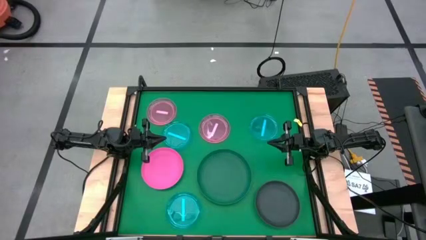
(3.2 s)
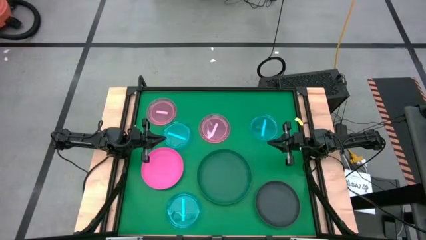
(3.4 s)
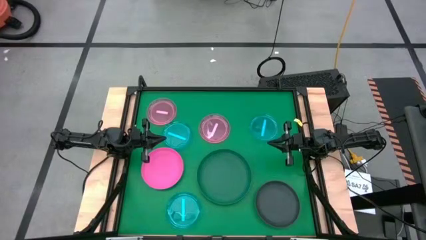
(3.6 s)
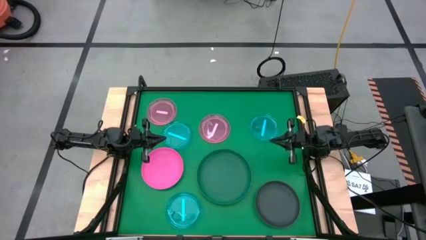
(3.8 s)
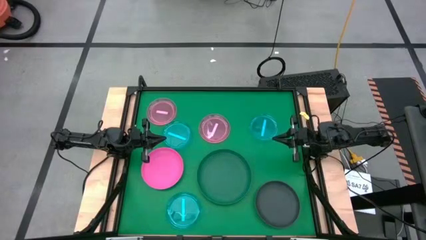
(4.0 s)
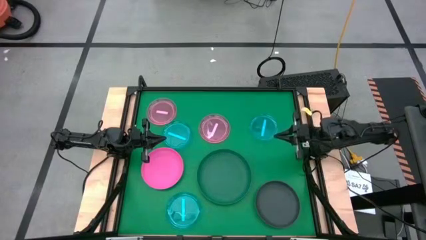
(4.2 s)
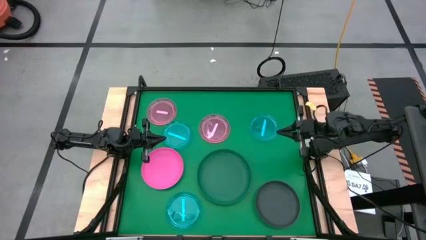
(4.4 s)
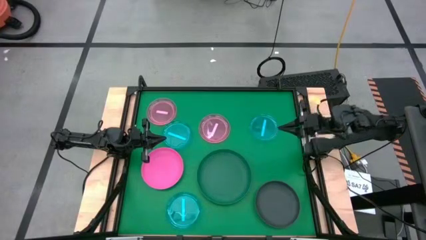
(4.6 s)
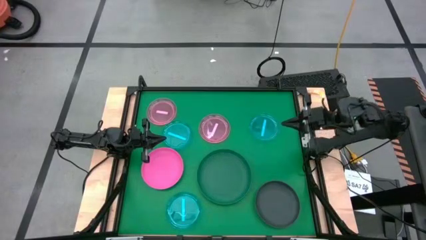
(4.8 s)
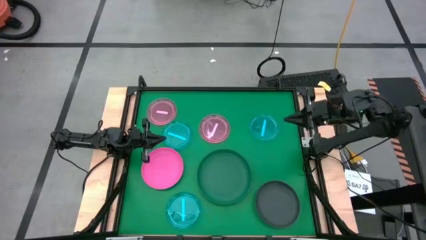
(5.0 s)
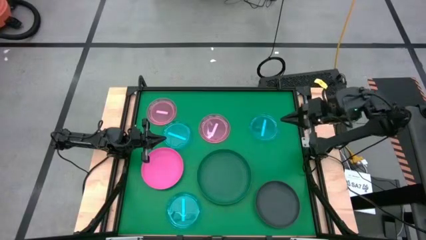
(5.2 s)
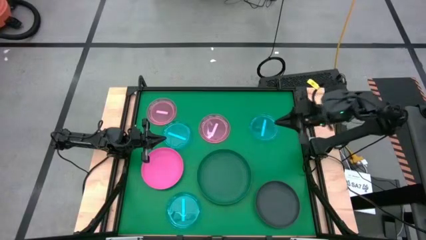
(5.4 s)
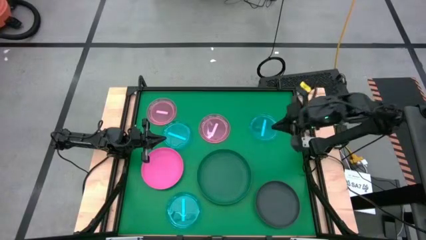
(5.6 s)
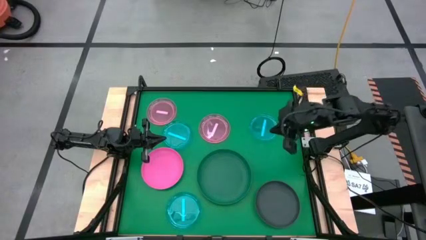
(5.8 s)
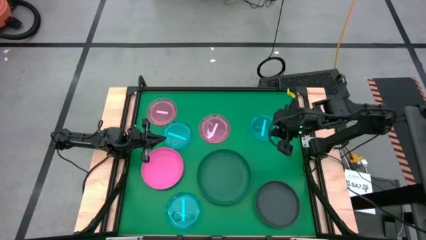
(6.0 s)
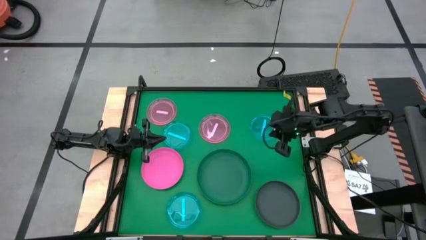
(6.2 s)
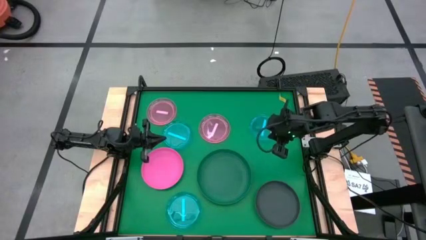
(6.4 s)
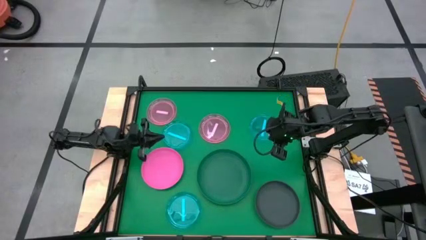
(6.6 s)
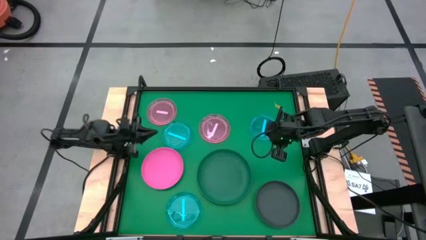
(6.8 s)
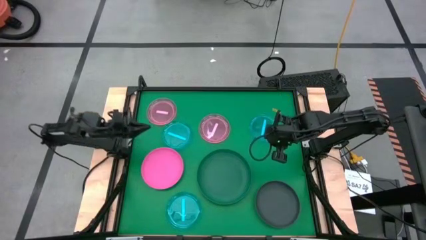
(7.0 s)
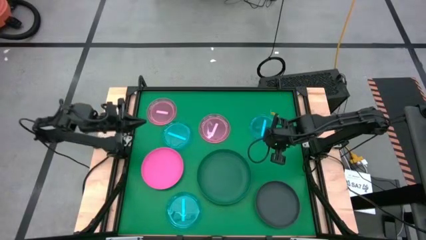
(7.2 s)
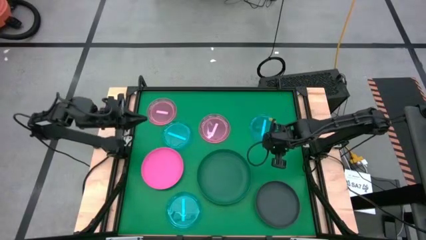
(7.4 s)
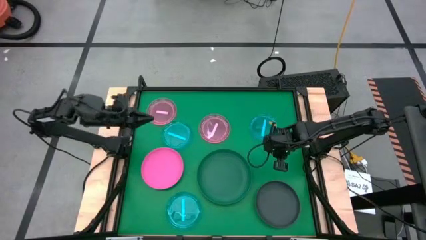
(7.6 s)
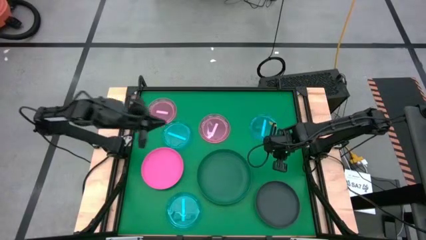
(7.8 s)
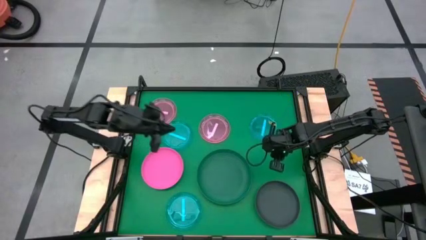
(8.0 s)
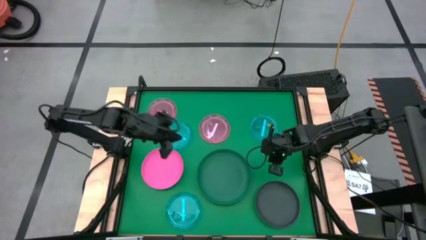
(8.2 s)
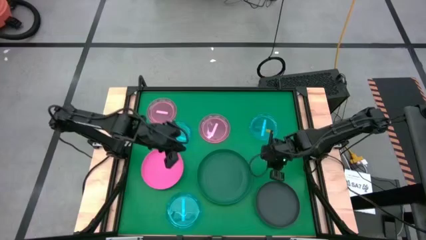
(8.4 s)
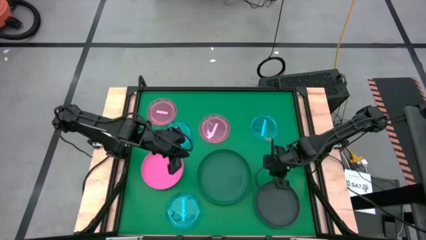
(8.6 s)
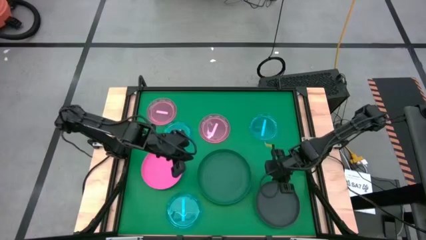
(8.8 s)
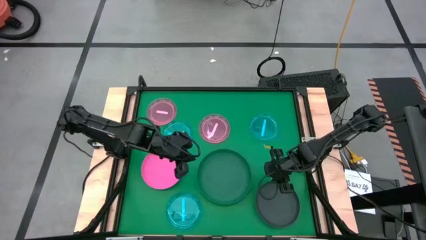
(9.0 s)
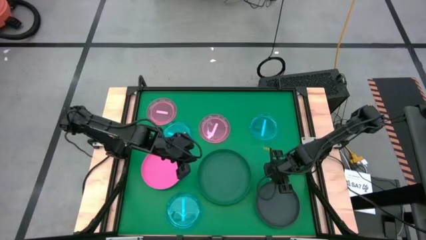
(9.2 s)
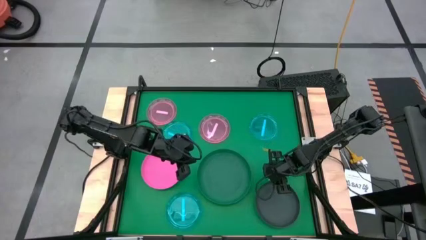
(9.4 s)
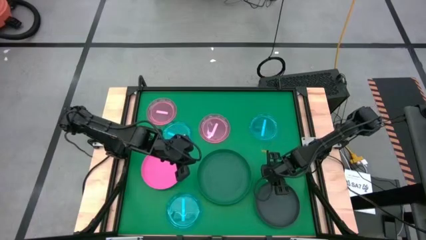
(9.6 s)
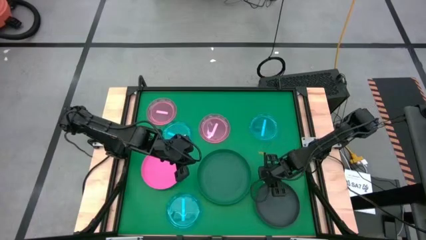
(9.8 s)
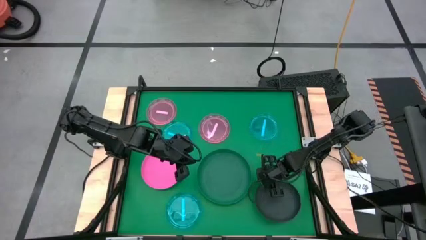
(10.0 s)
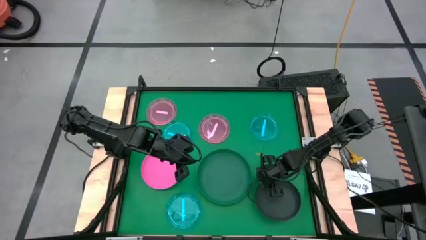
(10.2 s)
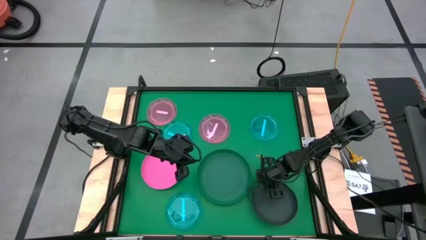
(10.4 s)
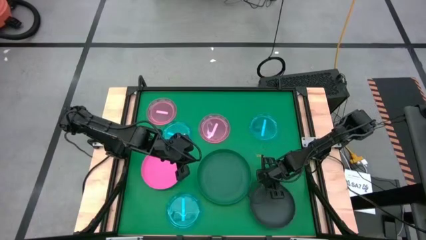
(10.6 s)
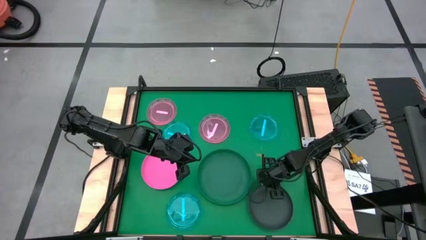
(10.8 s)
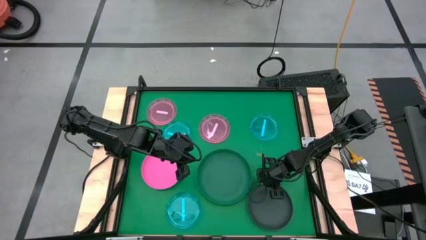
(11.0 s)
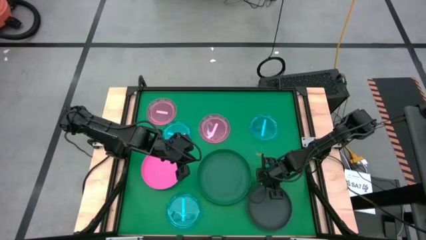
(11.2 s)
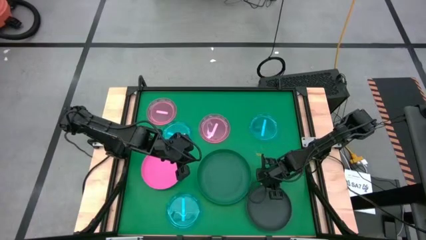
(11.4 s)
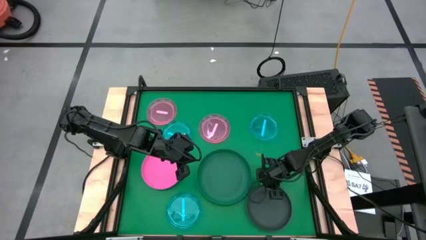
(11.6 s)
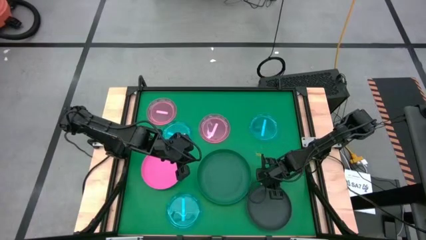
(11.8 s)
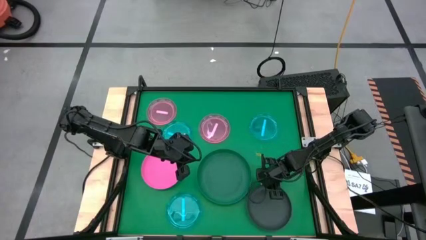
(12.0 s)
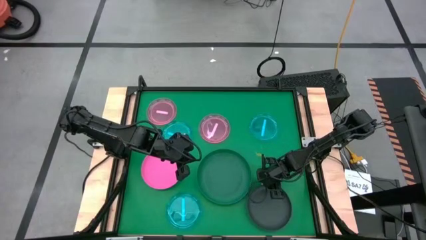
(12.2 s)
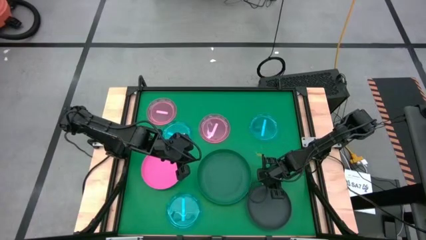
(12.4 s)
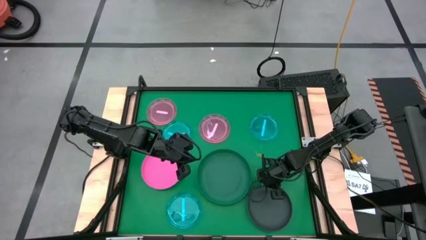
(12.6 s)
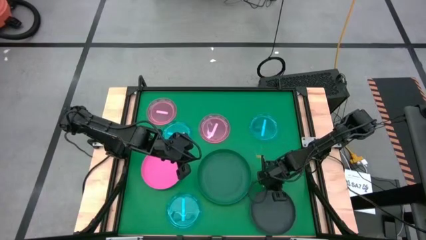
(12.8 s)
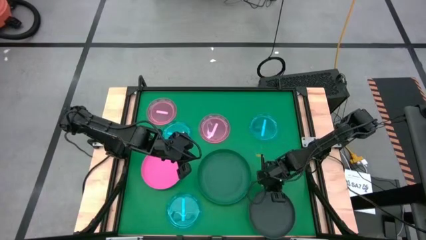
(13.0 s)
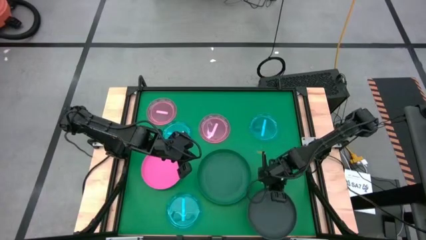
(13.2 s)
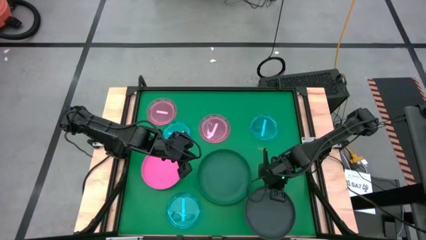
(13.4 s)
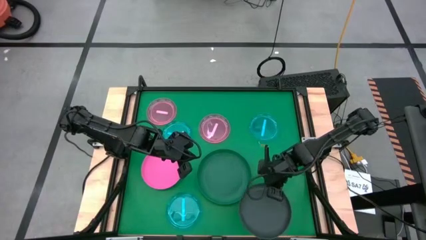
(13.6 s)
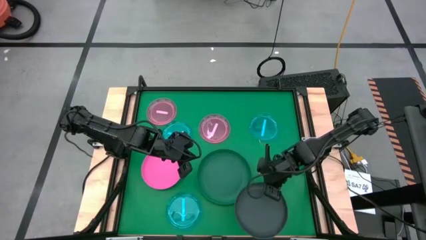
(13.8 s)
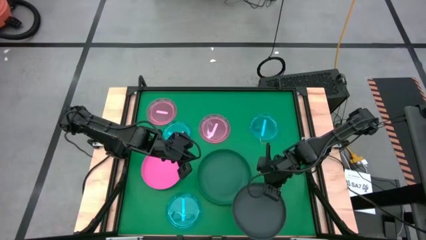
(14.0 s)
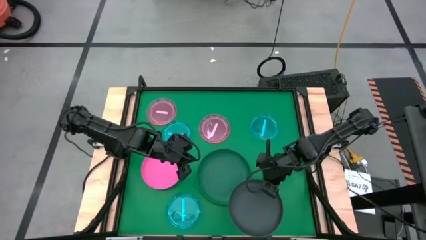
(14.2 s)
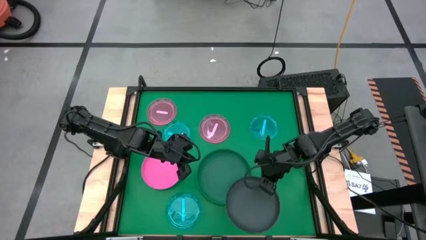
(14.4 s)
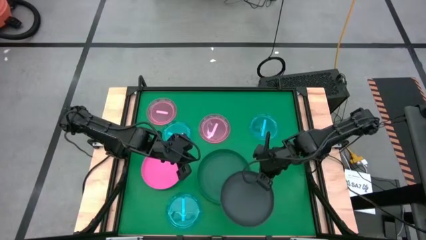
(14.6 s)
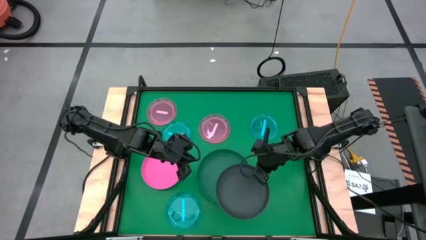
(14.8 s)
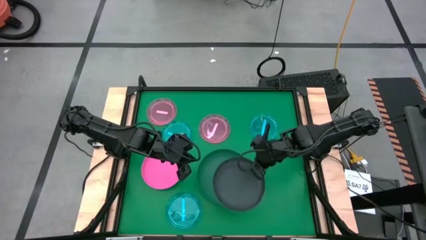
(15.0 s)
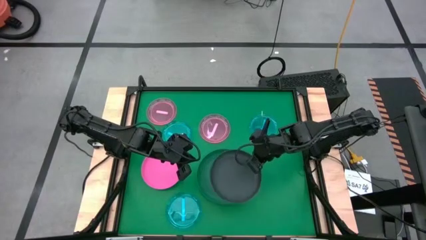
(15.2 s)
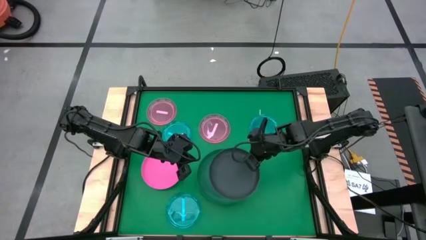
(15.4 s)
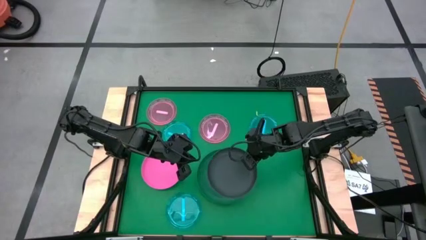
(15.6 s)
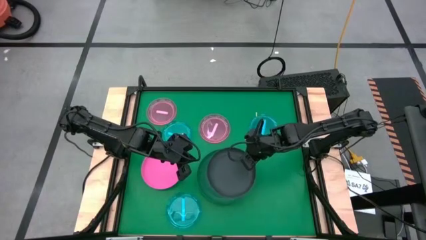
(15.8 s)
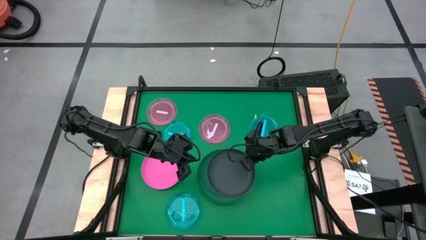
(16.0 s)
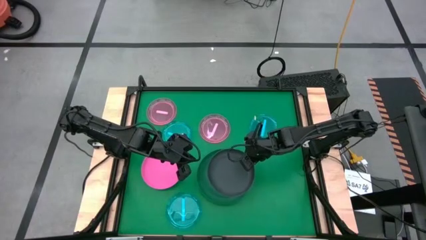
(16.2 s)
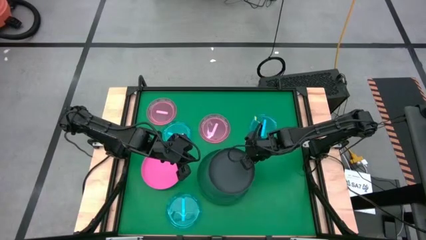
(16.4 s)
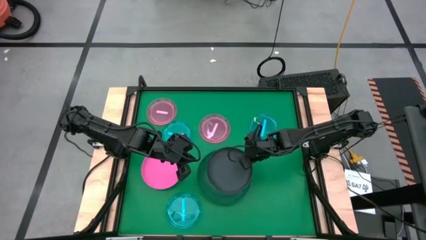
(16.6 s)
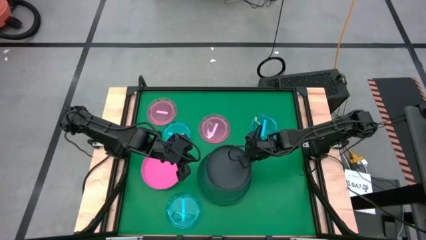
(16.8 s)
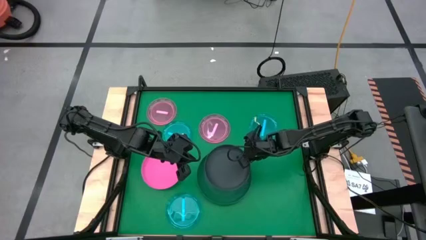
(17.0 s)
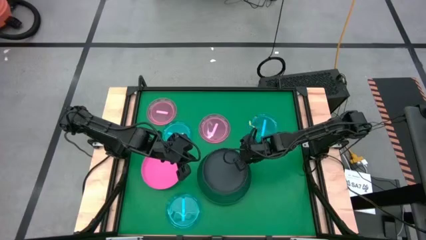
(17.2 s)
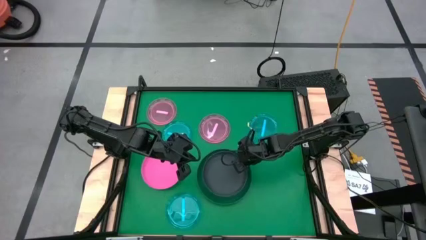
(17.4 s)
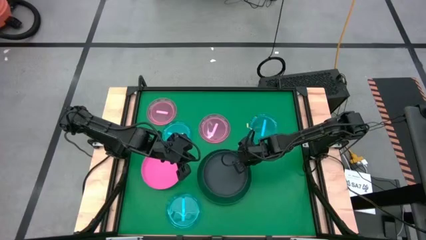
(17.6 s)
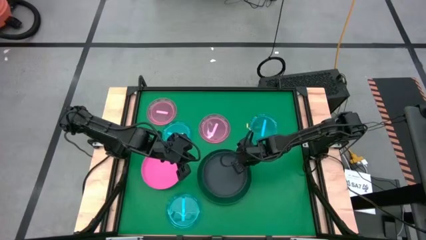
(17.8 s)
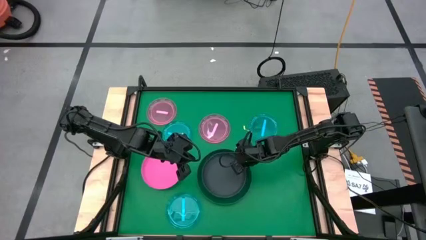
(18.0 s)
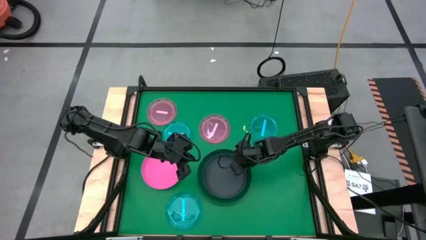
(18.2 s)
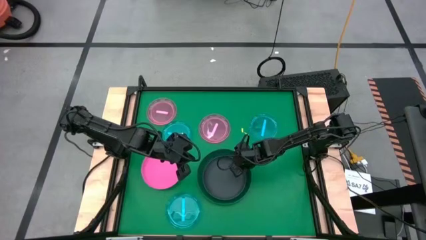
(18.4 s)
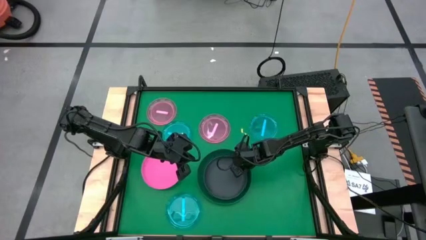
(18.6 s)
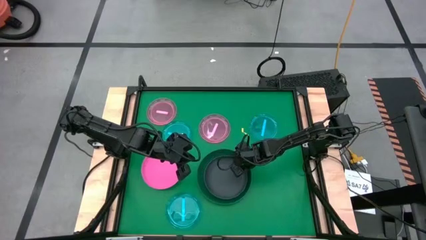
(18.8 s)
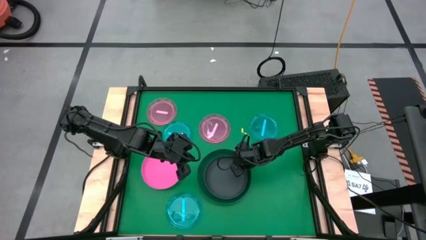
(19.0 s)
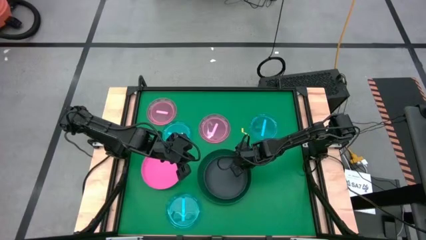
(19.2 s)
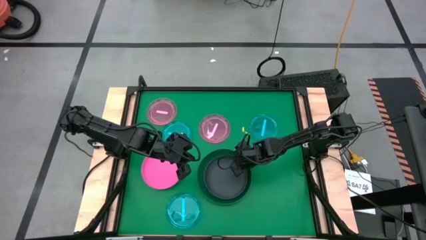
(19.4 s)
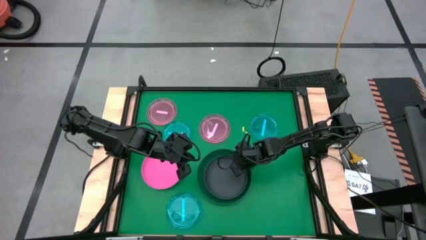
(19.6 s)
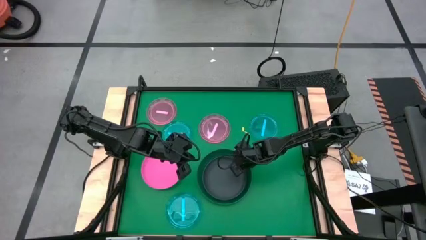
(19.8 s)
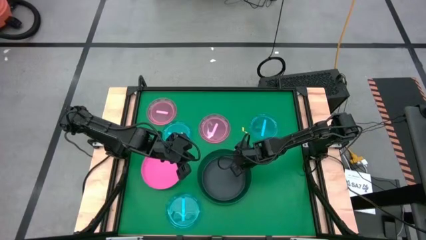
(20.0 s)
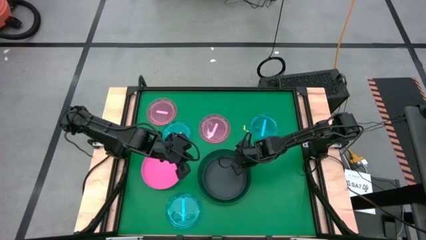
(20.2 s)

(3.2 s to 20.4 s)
Task: Stack plastic plates
Stack the black plate on top of the green plate
